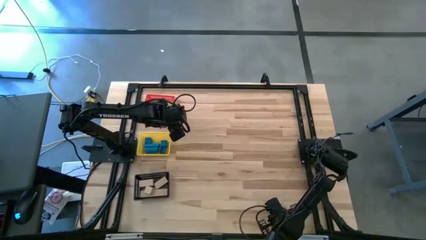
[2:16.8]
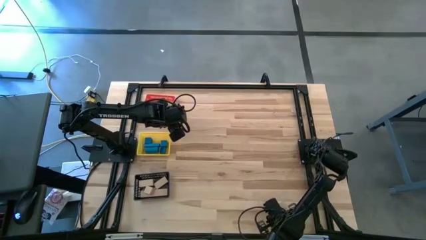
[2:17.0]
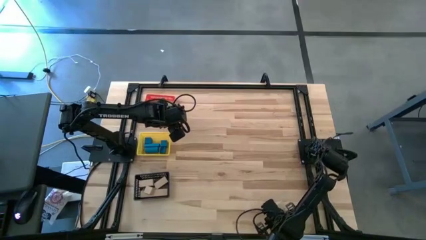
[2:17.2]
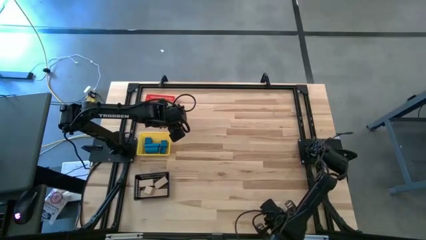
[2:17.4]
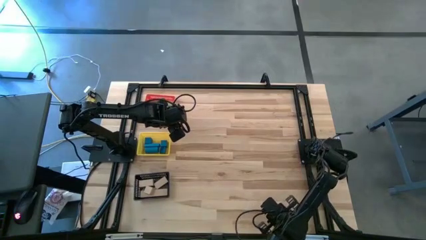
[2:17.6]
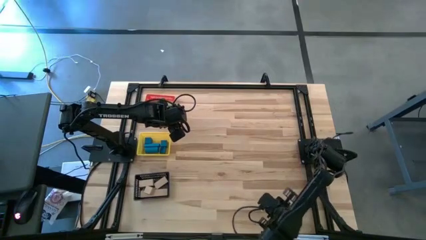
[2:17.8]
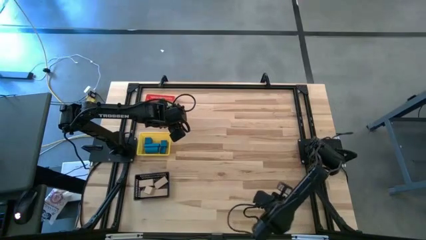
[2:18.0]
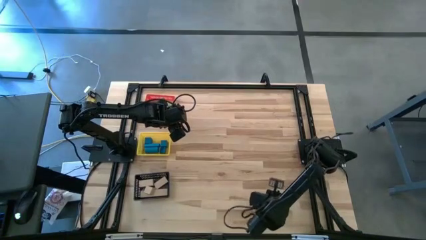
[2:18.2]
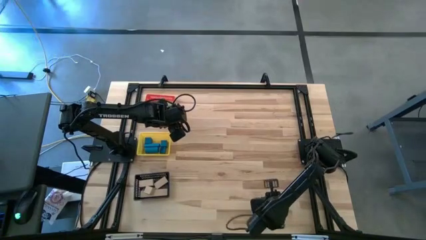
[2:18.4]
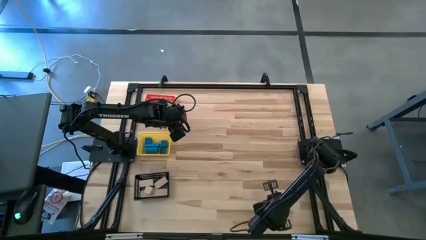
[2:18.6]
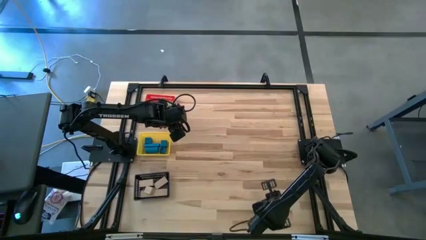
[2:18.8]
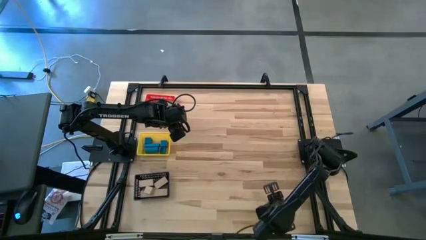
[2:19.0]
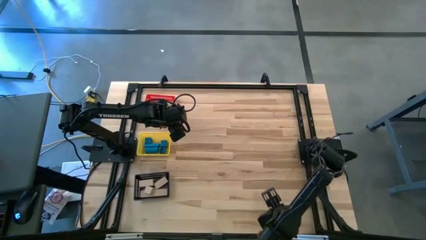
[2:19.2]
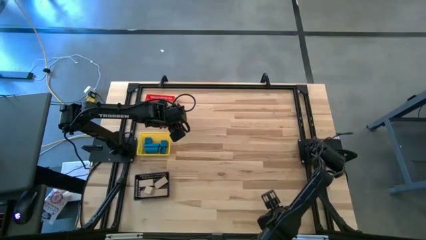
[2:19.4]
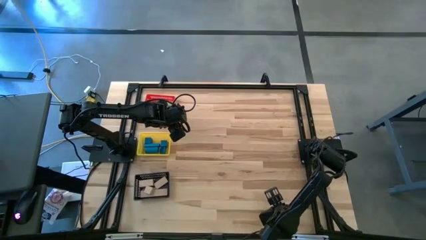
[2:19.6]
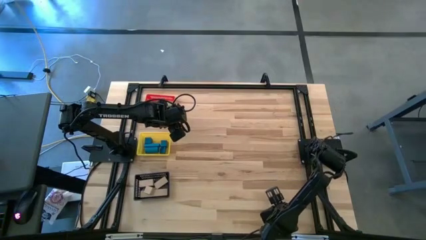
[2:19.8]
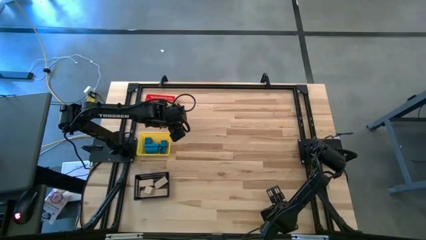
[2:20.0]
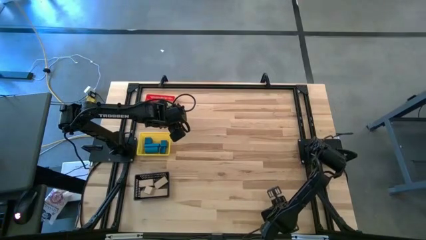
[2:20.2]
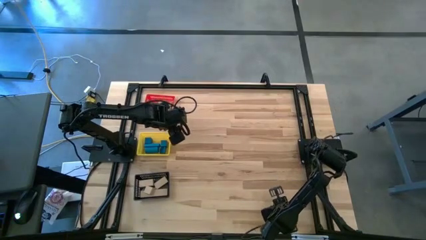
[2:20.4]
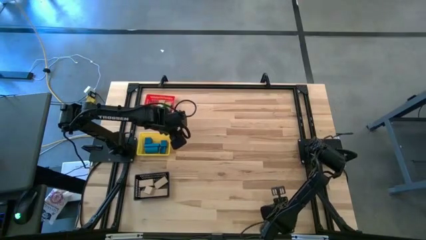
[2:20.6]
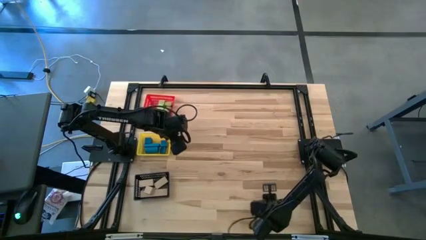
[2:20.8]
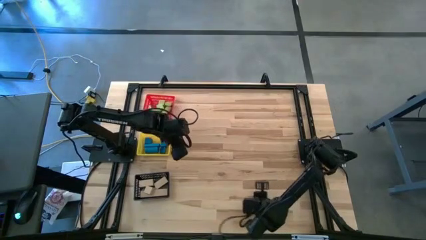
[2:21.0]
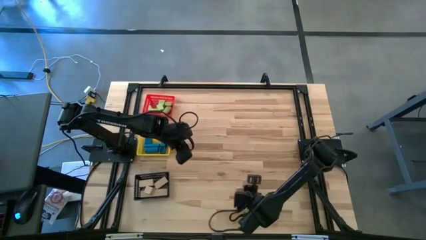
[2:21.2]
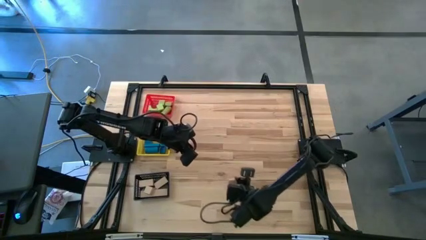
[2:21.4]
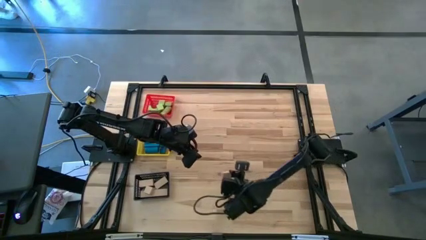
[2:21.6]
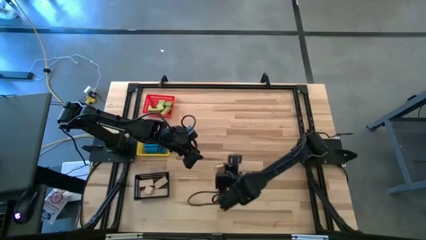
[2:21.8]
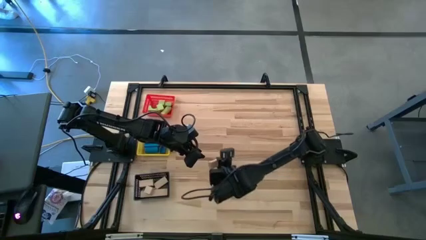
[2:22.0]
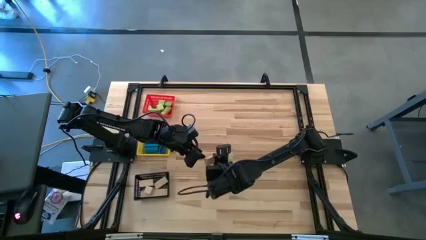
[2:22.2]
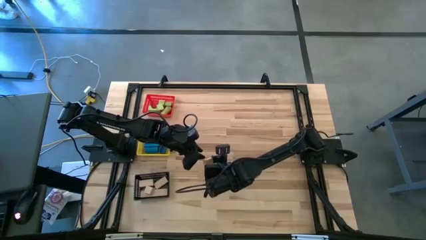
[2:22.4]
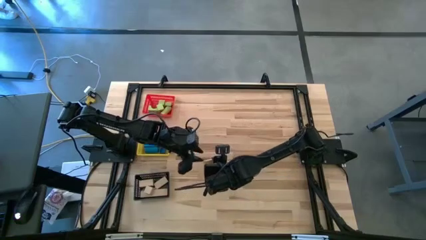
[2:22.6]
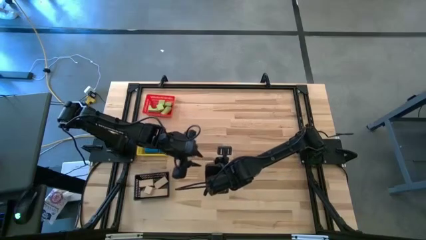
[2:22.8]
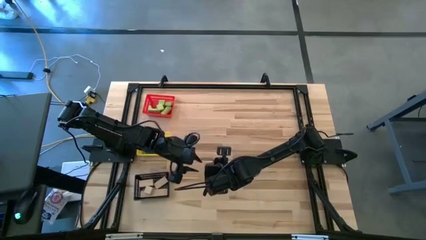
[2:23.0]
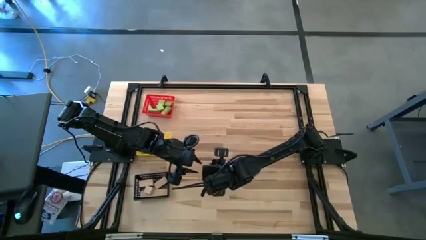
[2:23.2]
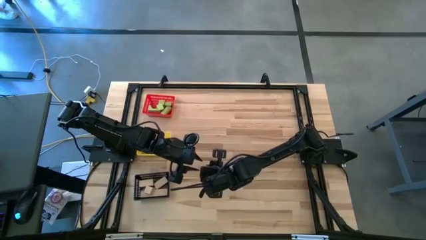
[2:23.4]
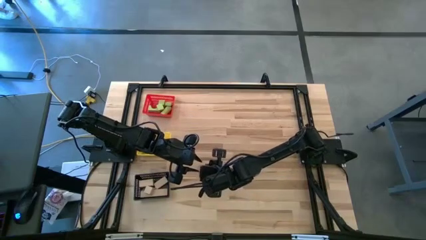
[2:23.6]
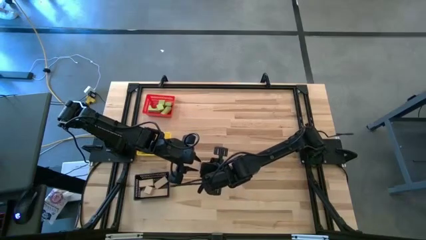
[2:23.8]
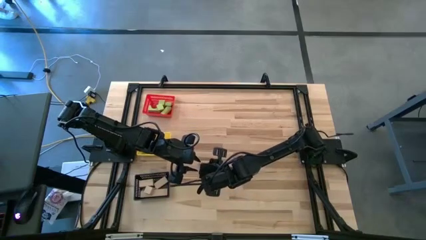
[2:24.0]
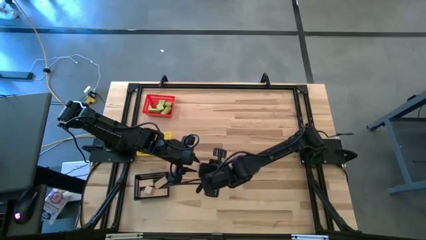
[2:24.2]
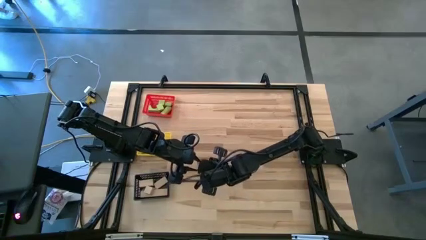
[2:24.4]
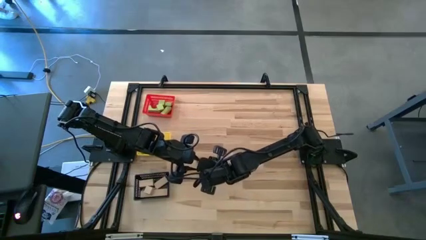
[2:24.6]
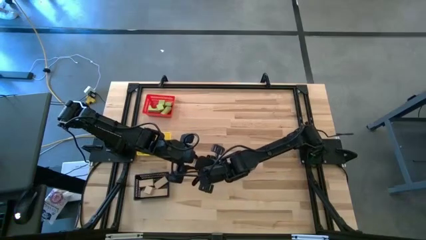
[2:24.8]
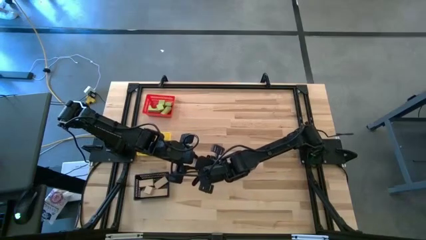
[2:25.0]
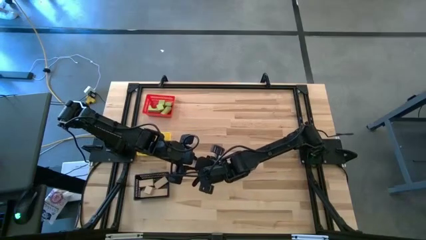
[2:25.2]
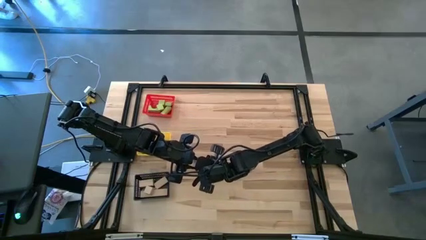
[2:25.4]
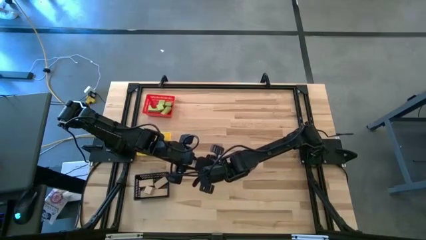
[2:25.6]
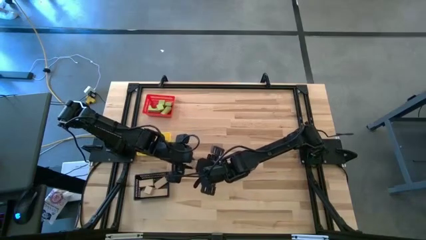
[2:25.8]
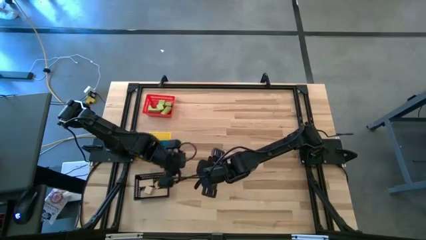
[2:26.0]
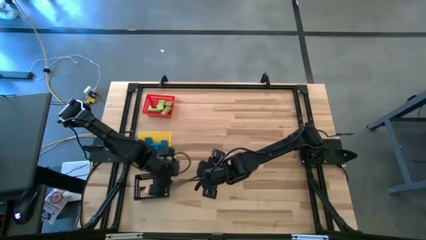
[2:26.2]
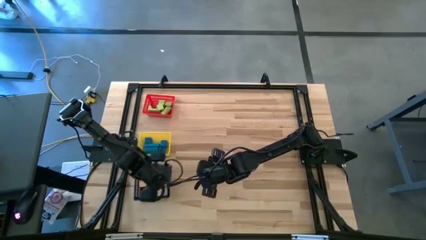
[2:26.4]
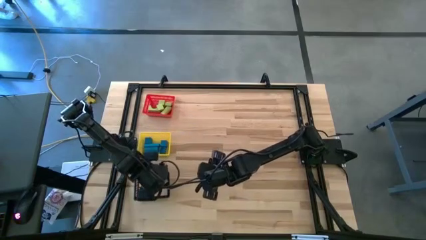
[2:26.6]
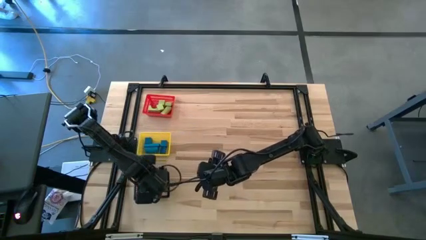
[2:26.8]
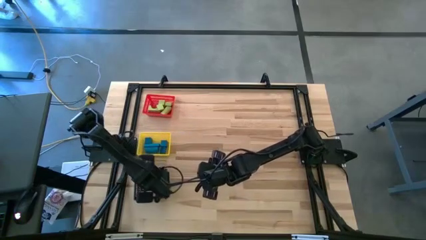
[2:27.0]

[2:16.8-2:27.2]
Task: Sort & place blocks by color
Put the rectangular wooden block into the black basket

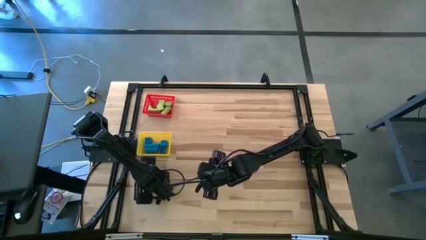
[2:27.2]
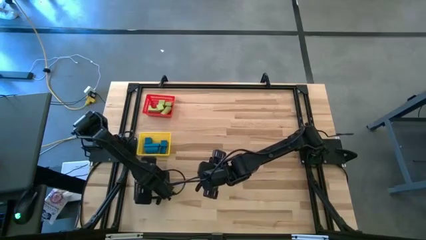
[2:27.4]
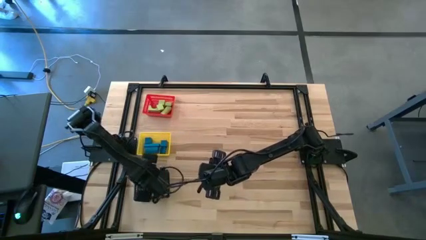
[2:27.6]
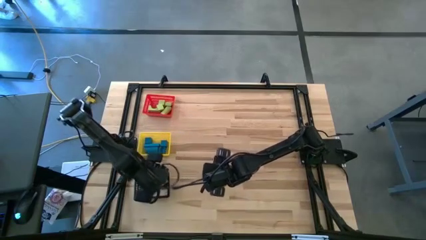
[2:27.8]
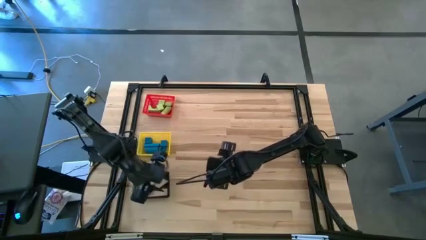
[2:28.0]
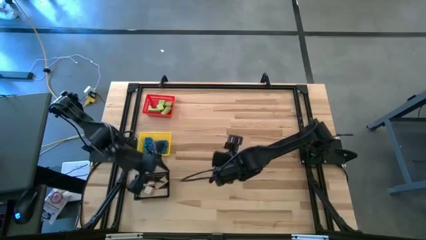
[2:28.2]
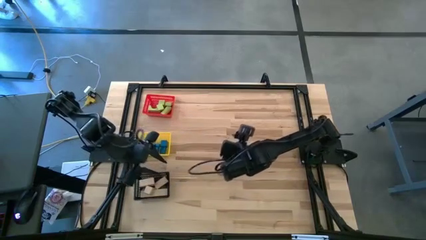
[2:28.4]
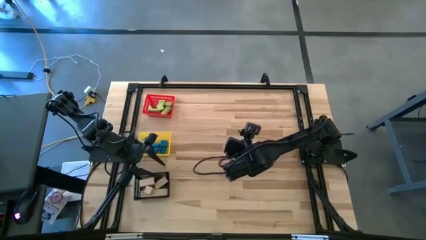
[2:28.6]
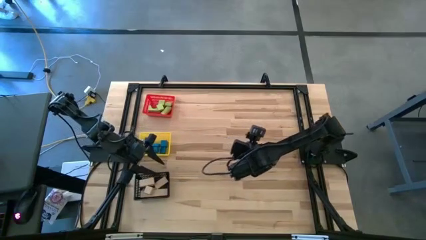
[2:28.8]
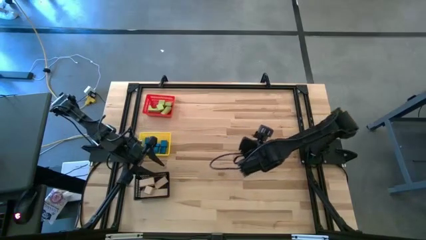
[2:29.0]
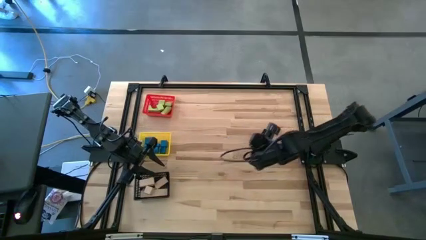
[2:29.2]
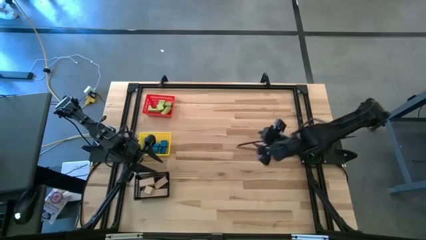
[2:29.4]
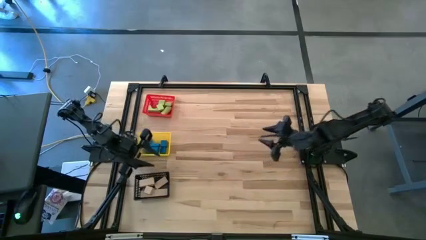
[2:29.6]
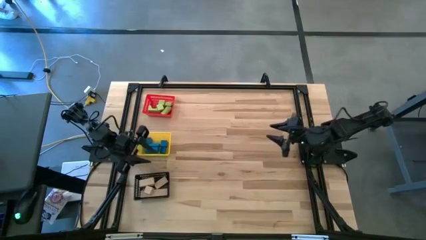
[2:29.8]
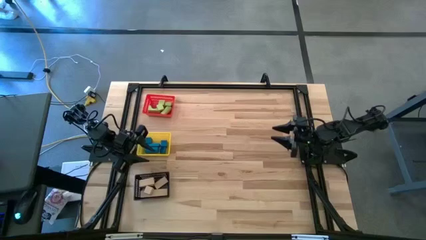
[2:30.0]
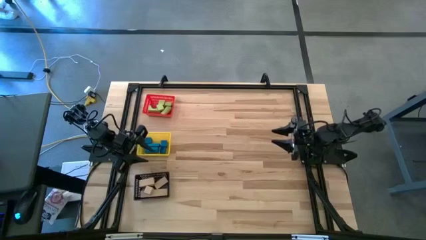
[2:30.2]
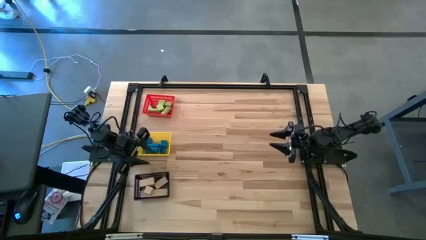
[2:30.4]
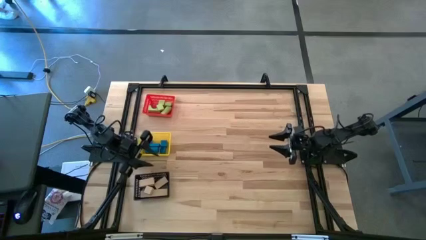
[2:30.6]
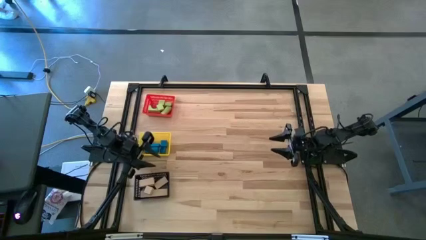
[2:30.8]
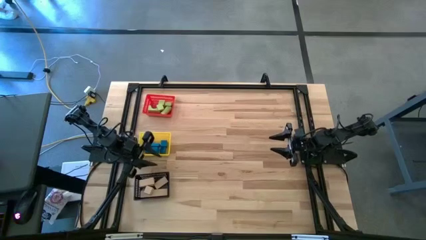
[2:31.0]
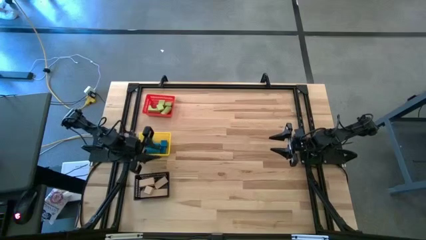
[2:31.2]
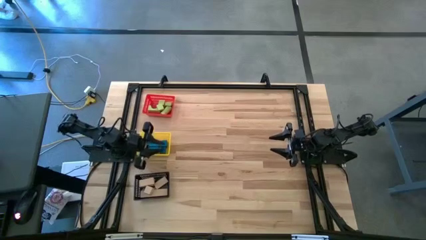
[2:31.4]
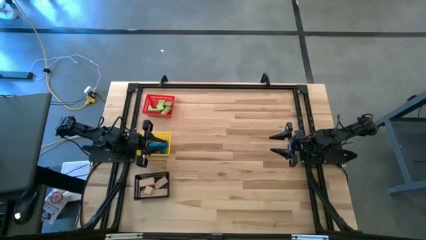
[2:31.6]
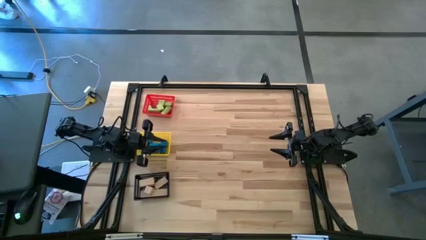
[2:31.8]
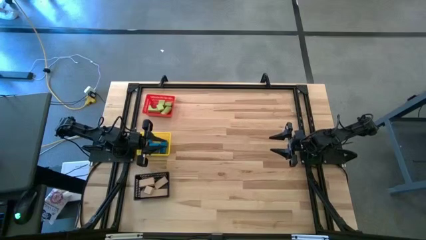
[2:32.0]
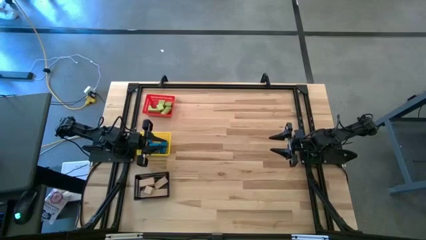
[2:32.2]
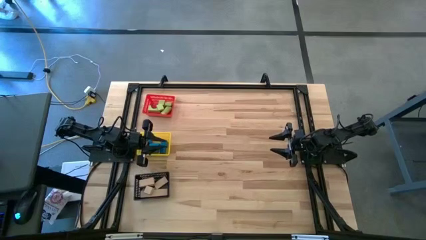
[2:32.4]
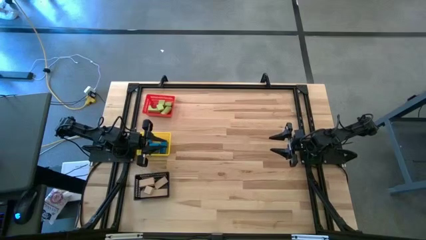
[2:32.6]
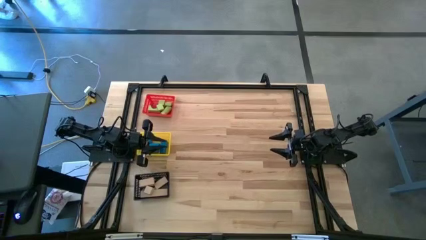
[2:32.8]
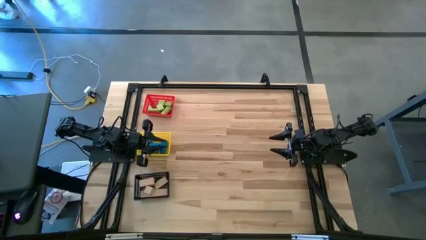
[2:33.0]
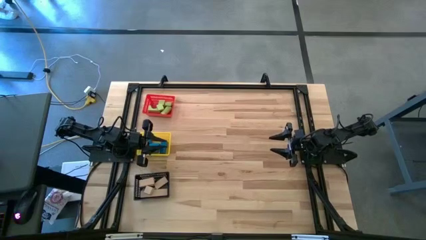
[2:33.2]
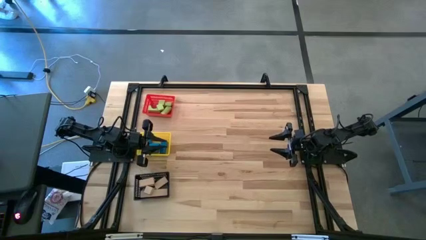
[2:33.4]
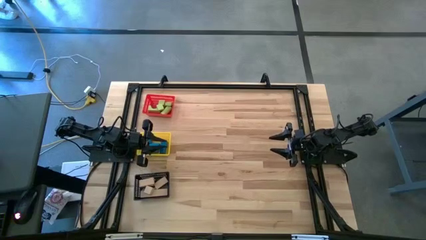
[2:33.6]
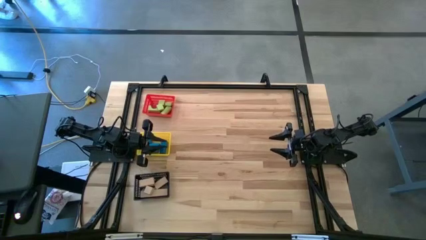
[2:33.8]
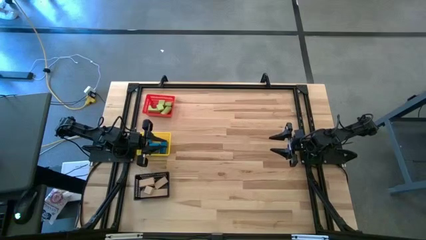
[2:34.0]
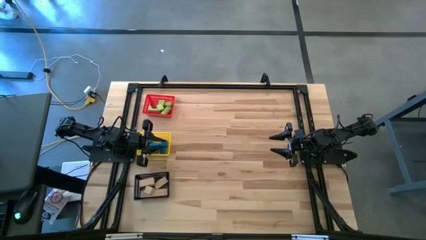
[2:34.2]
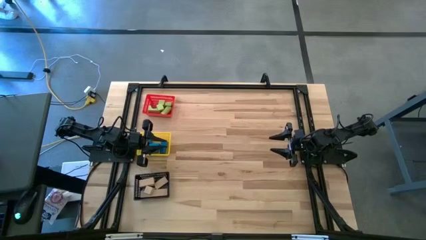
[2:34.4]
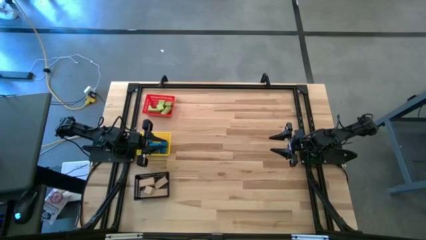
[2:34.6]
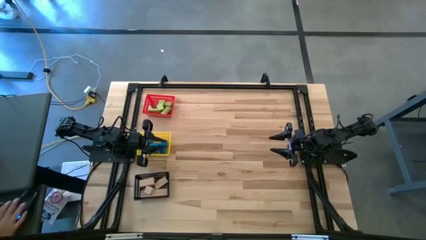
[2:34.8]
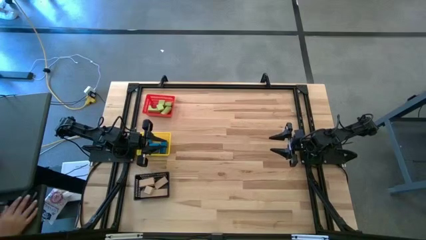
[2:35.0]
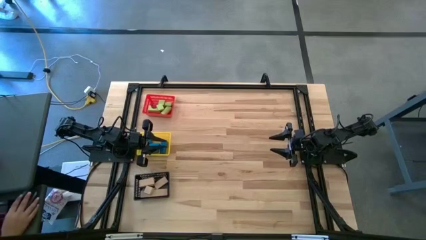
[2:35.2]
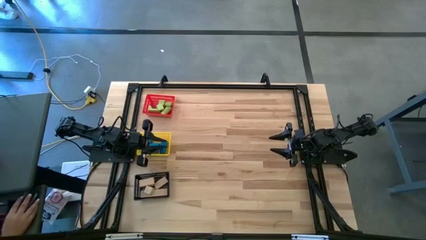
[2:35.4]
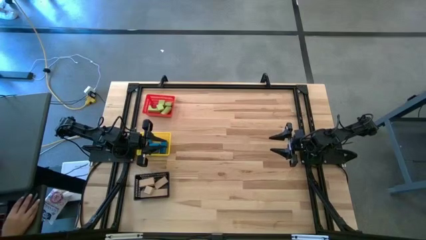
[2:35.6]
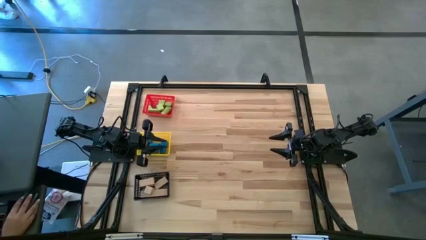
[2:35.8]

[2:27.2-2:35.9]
Return to Home Position
